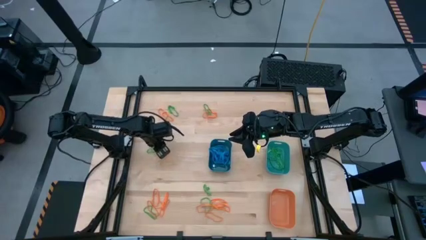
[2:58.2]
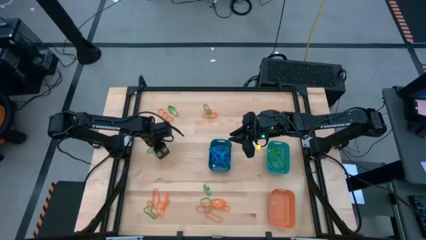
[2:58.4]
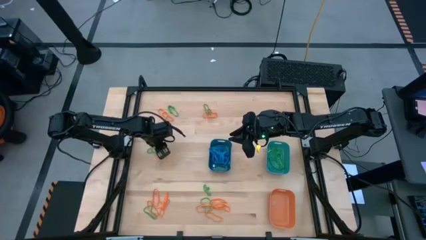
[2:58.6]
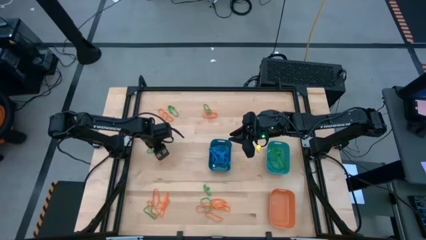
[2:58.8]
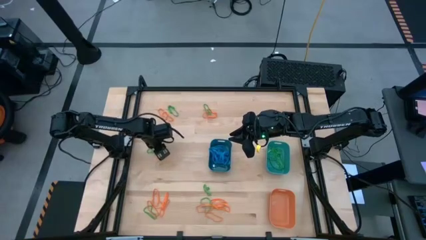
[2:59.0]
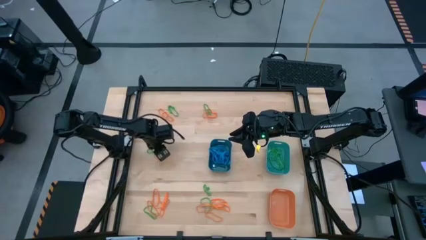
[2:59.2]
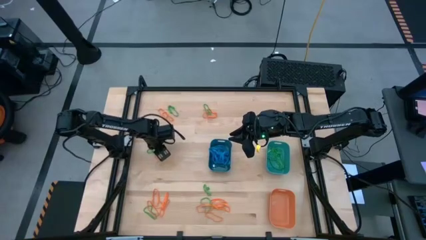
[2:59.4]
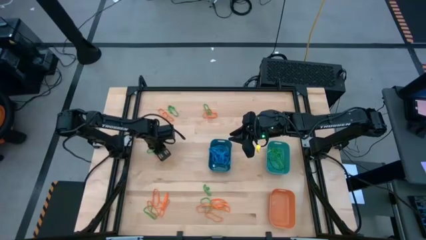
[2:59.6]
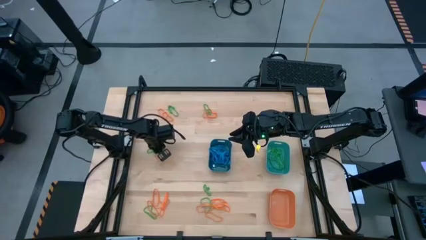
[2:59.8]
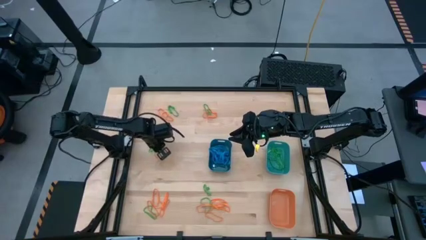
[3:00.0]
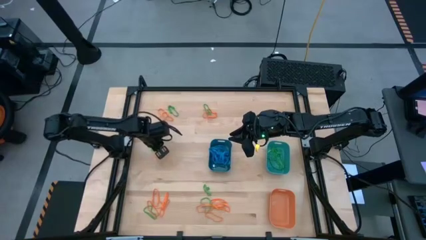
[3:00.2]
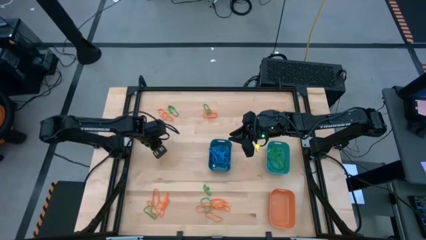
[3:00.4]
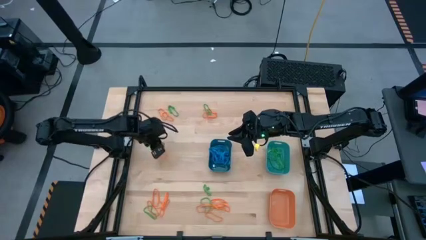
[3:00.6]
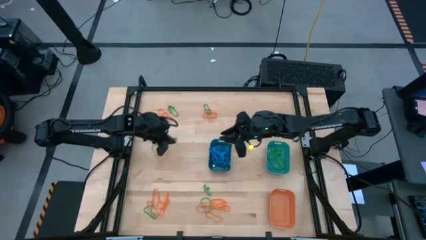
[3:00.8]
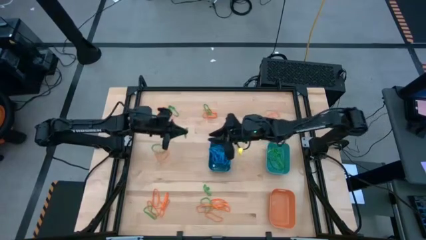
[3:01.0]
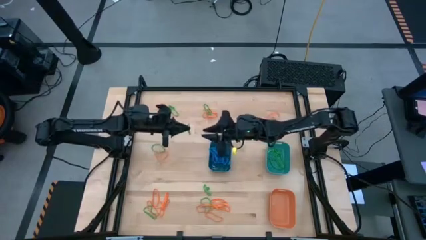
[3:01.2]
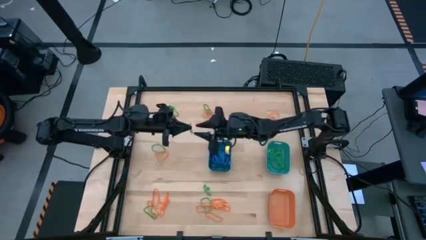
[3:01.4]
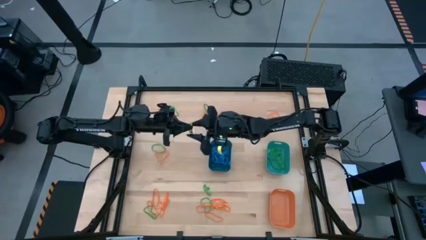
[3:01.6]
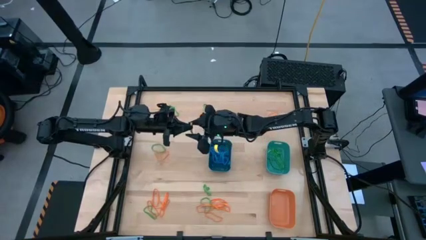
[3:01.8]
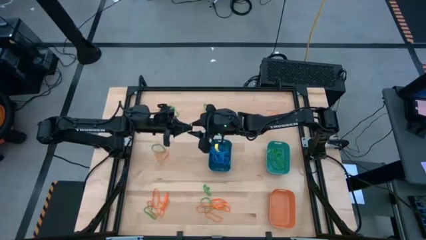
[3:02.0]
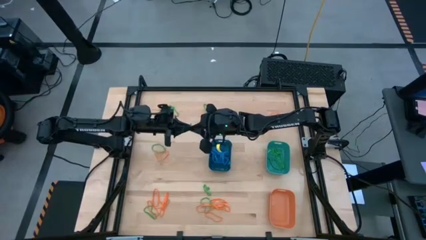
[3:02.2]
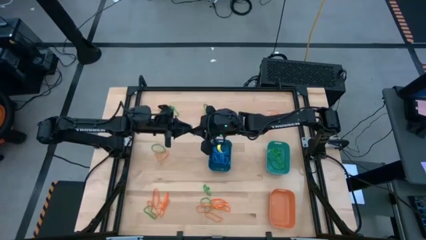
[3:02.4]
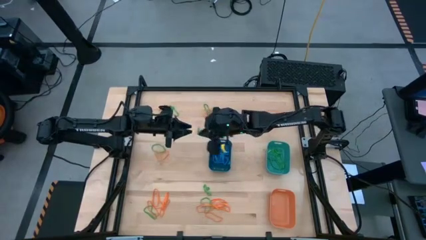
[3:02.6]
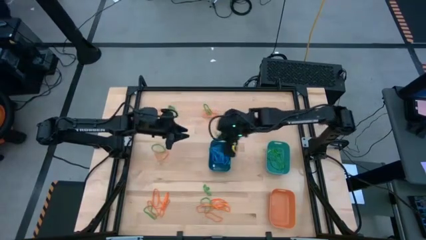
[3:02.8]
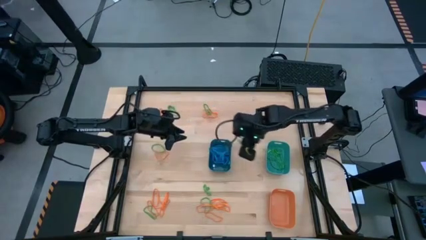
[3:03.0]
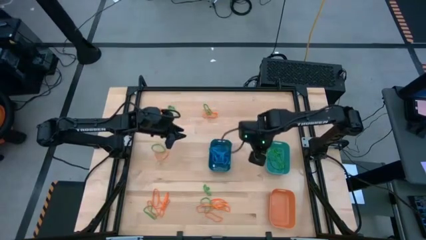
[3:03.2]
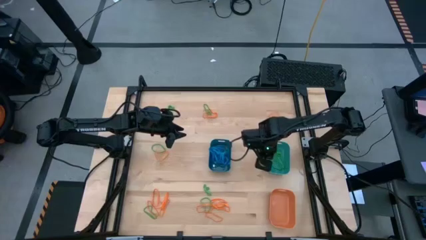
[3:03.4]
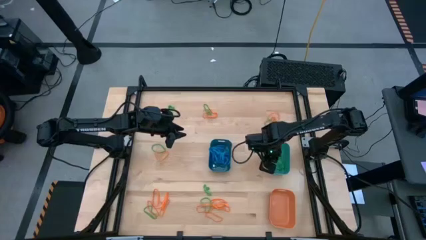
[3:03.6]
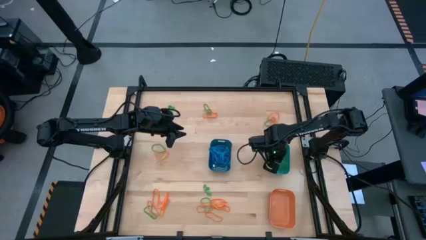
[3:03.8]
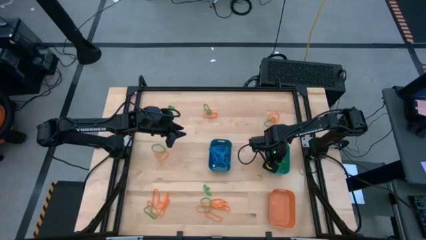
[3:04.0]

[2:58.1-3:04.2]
Task: Sort rubber bands into baskets
Put the green rubberband into the light blue bin

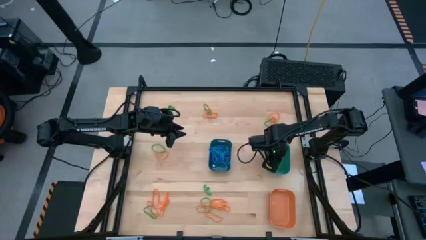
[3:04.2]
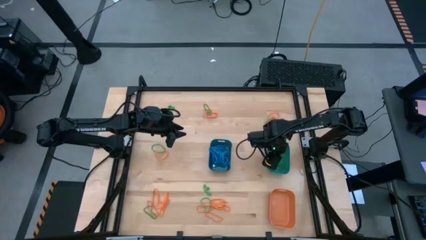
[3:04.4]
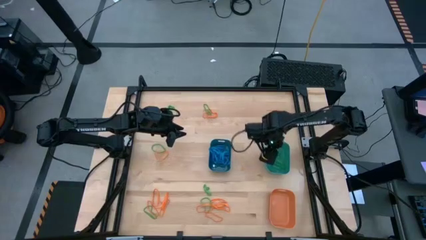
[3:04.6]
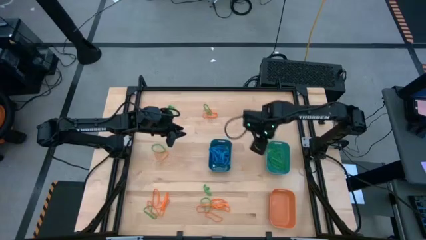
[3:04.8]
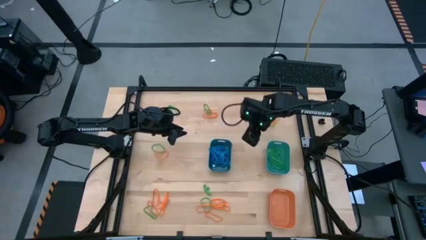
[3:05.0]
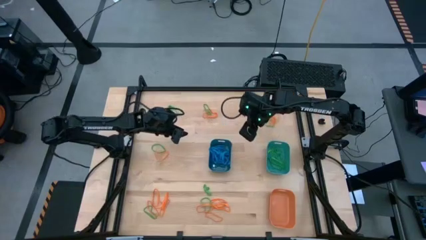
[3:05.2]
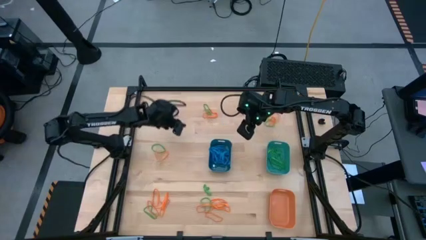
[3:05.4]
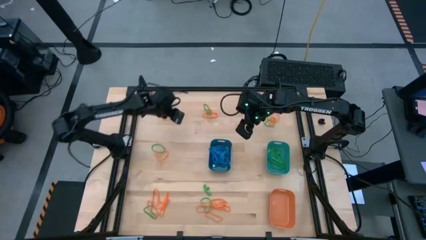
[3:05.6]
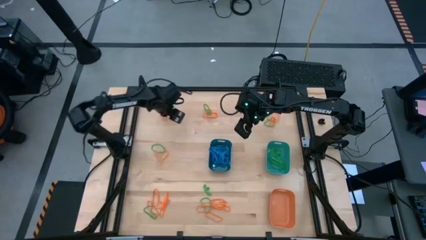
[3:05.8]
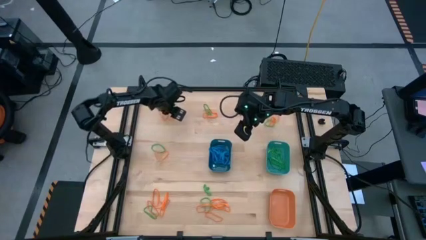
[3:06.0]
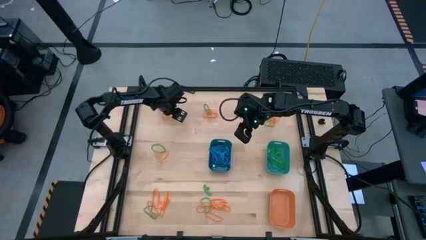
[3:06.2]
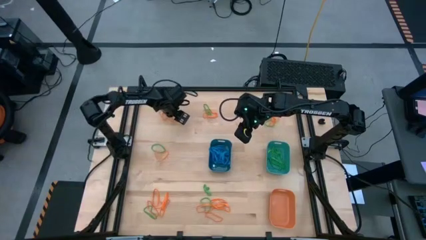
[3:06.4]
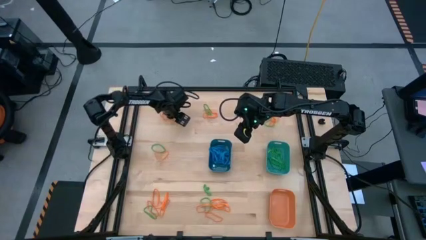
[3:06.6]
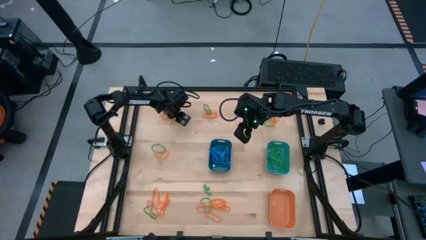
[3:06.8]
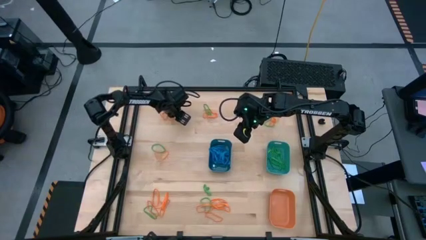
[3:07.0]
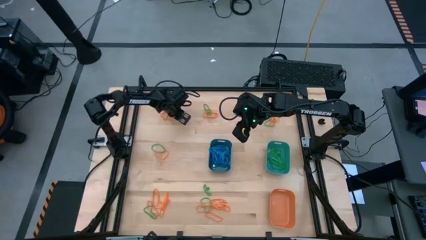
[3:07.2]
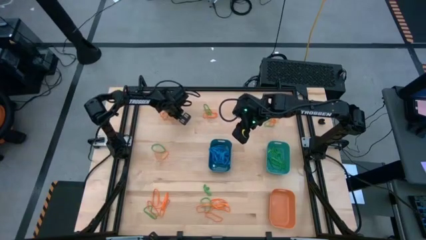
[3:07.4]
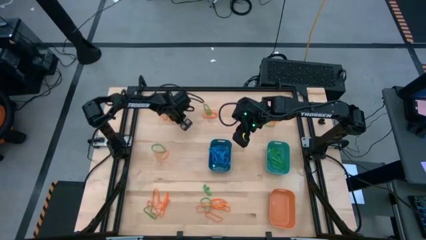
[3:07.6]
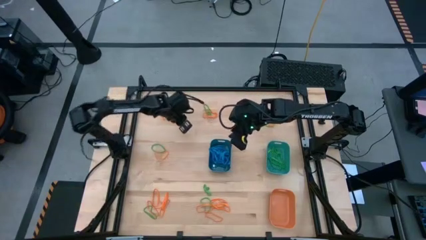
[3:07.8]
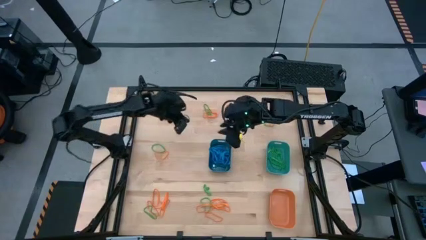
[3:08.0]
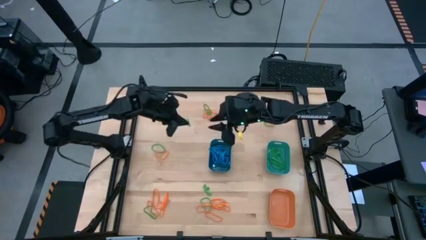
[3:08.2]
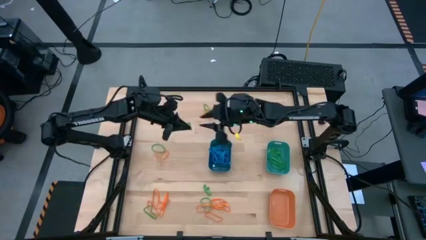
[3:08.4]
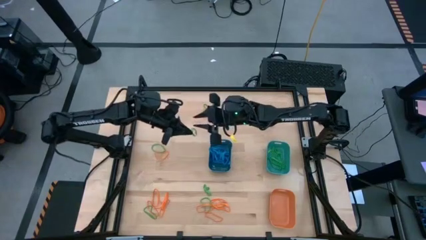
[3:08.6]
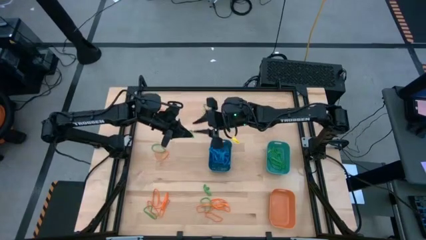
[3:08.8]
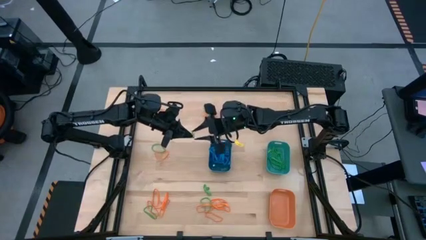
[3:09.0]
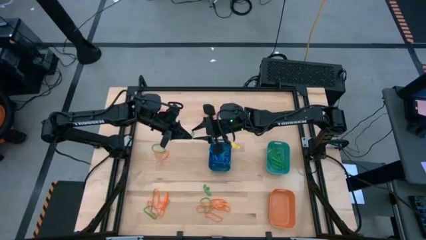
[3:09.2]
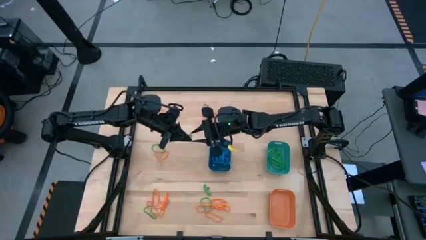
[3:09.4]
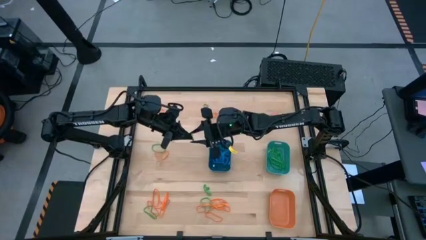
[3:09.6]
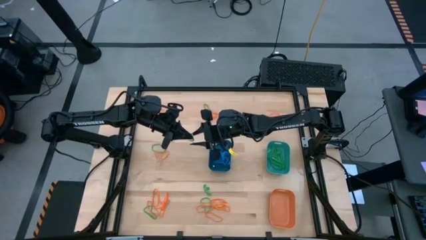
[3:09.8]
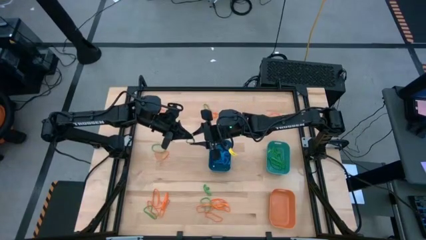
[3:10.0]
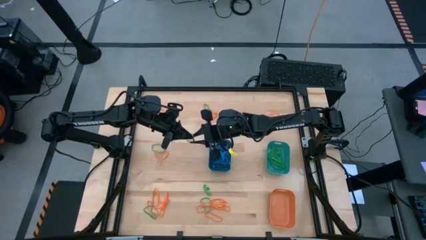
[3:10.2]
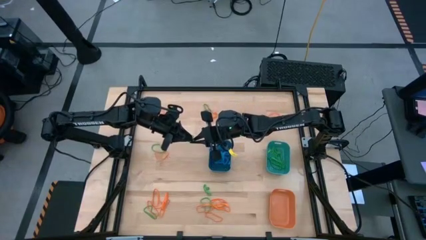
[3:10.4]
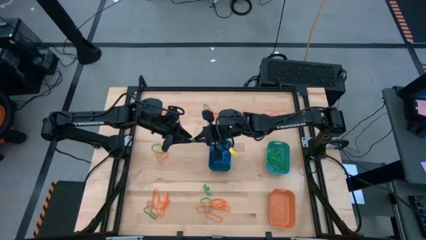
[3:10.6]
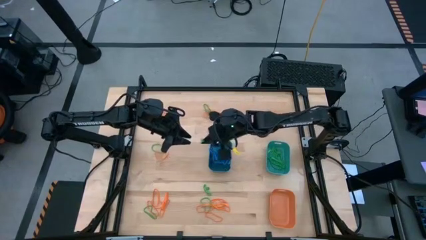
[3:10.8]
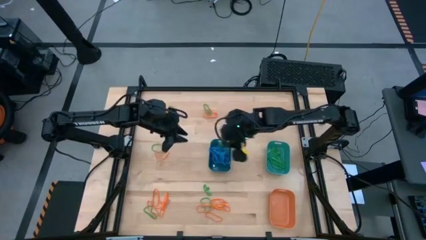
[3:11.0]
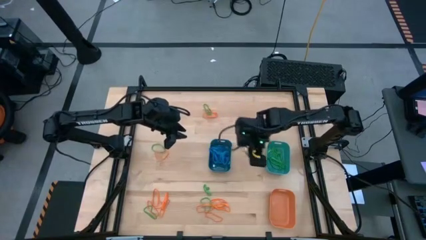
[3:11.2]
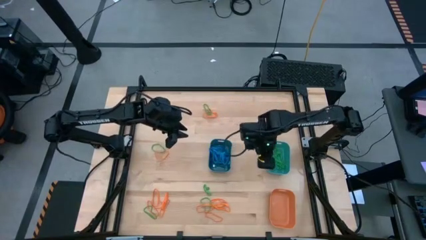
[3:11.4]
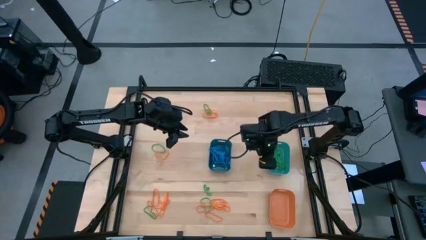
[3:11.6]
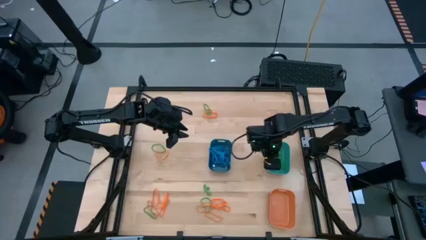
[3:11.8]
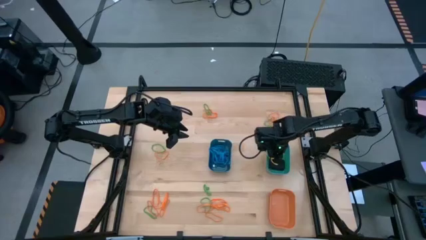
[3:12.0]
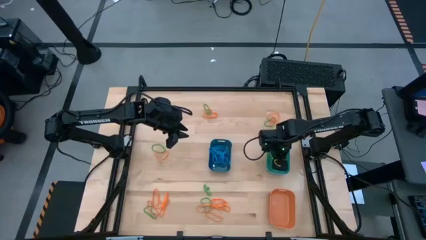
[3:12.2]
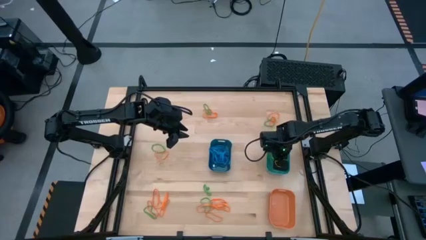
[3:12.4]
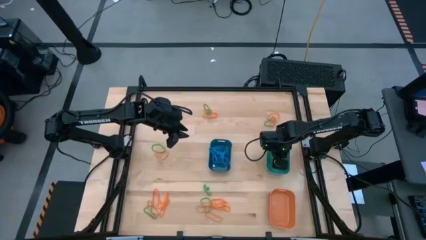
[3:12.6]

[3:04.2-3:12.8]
Put the green rubberband into the light blue bin

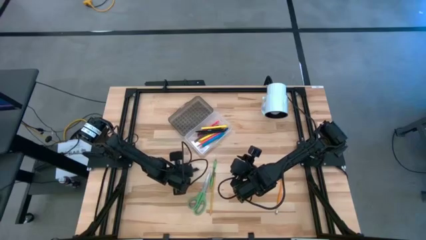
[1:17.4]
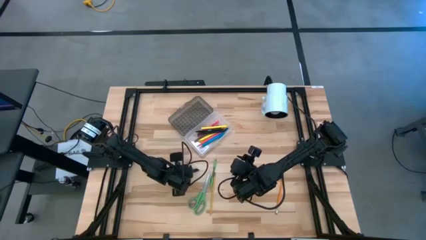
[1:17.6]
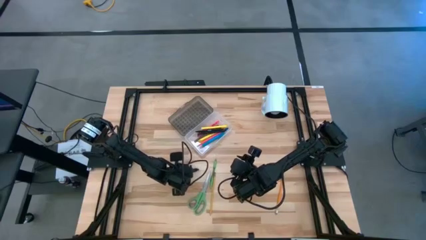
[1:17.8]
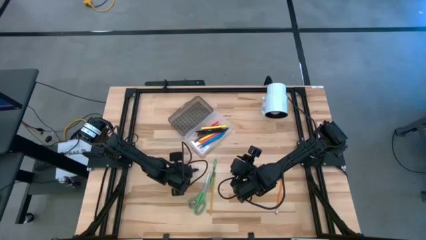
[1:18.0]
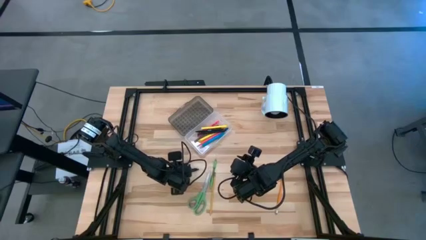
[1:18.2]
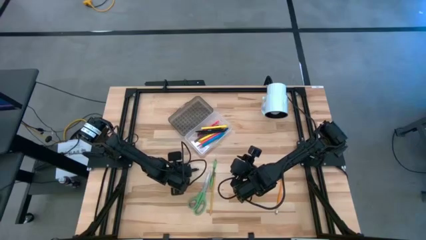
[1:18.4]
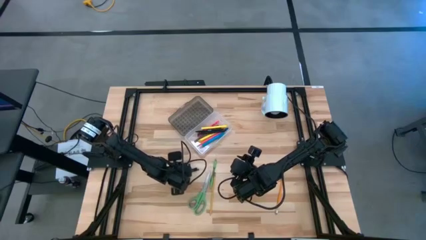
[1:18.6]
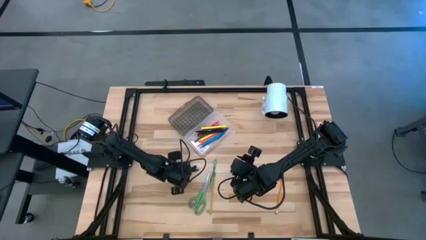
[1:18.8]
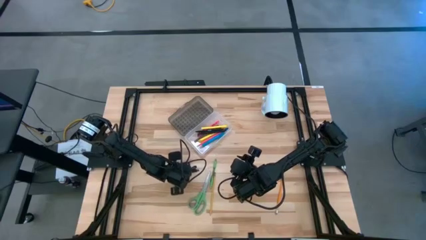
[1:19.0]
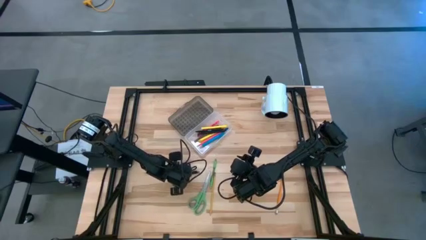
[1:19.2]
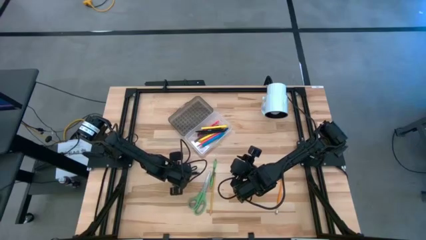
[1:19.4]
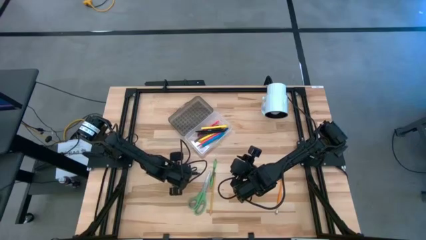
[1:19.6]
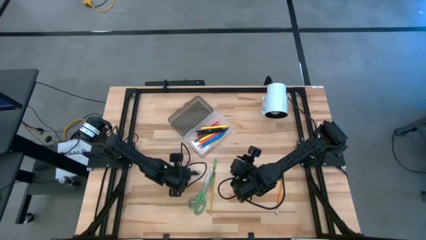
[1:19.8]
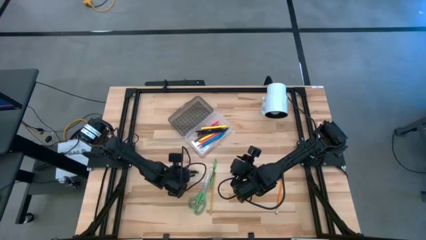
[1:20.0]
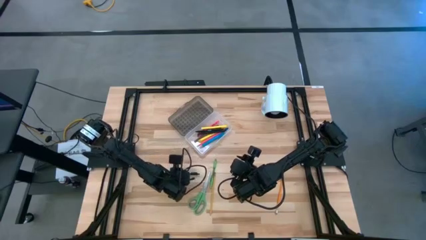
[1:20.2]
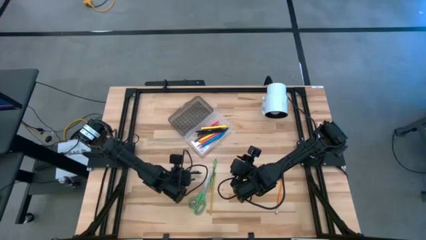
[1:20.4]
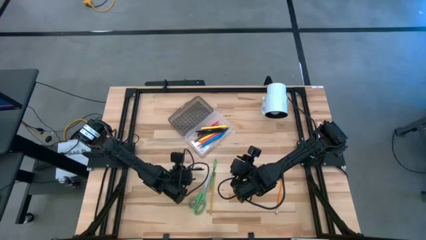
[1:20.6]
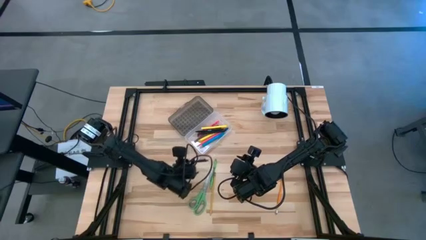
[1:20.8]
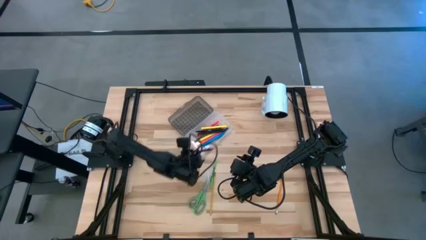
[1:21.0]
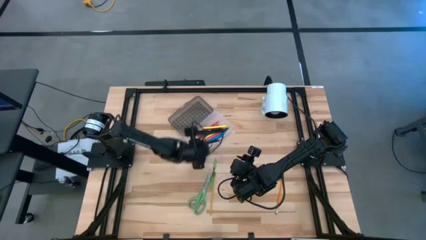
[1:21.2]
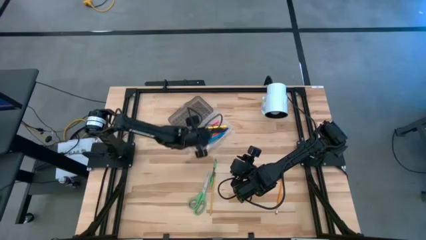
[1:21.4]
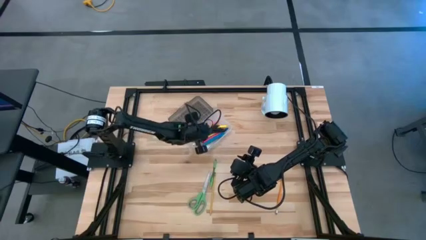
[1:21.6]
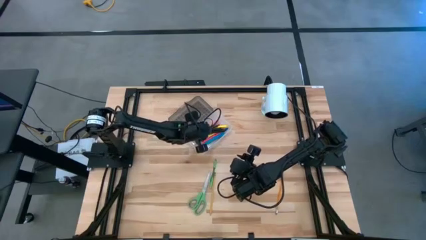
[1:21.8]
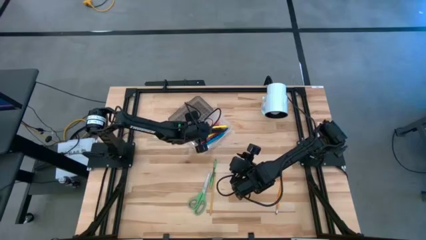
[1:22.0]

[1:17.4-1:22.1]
Task: Pick & place school supplies into a supply box
Put the black pen into the transparent supply box
